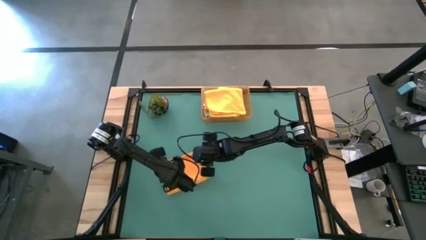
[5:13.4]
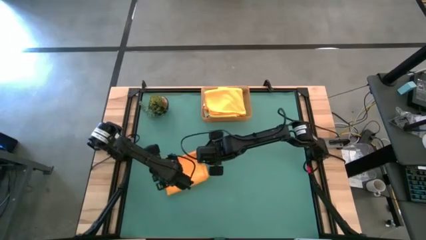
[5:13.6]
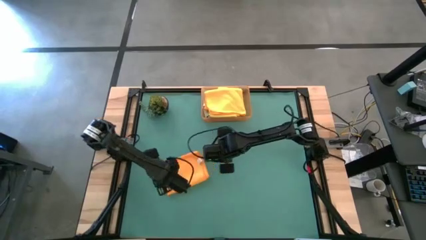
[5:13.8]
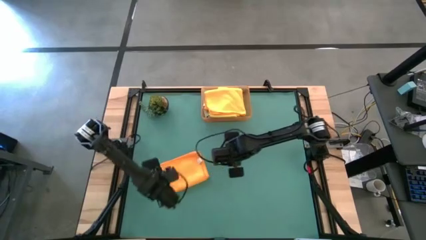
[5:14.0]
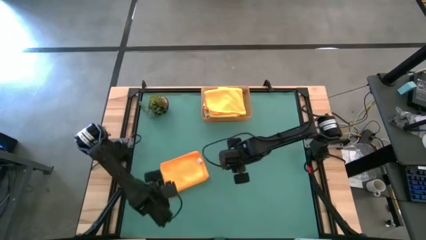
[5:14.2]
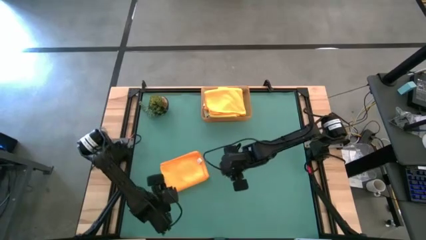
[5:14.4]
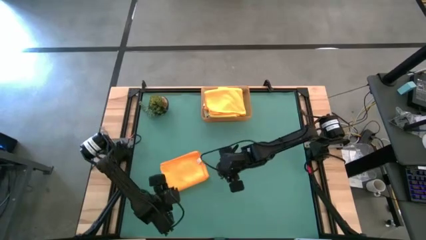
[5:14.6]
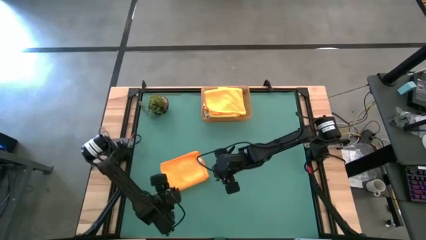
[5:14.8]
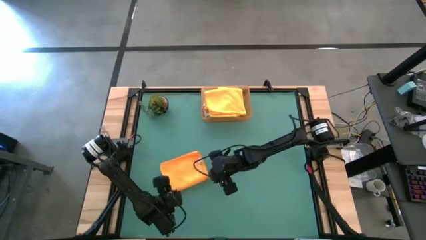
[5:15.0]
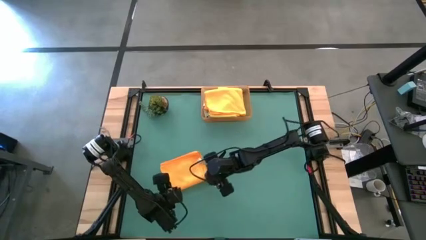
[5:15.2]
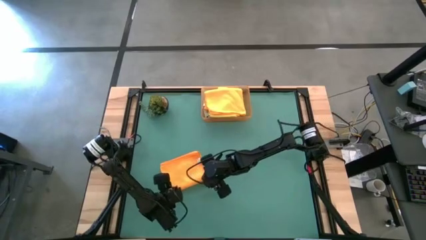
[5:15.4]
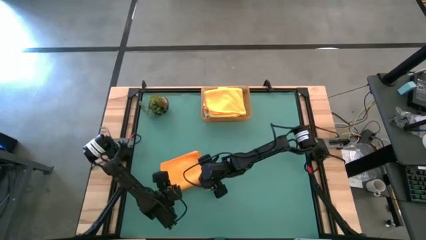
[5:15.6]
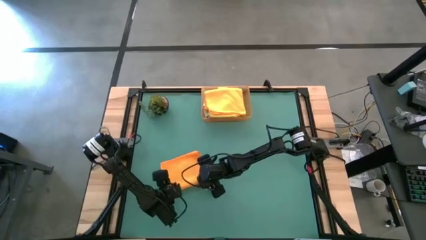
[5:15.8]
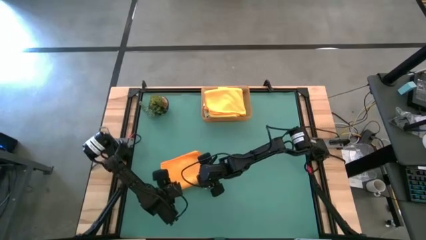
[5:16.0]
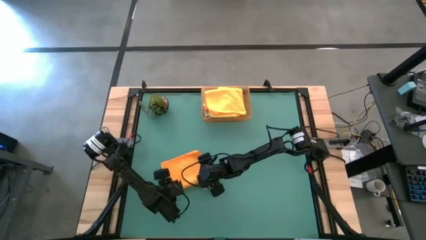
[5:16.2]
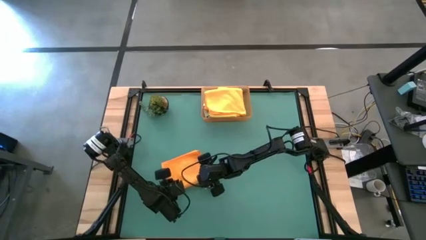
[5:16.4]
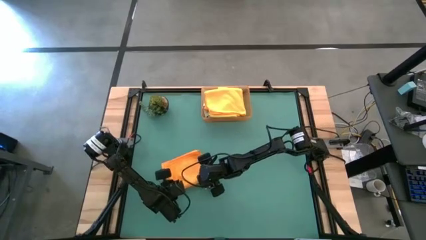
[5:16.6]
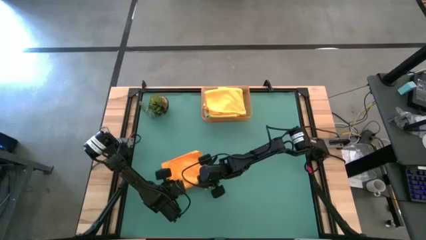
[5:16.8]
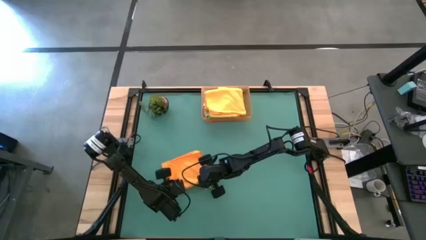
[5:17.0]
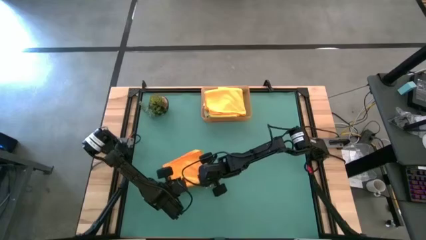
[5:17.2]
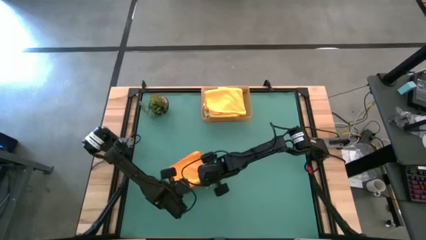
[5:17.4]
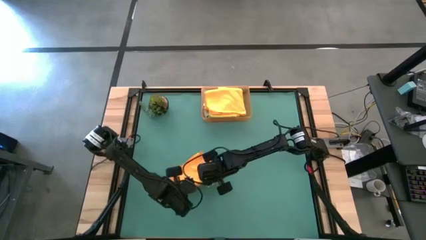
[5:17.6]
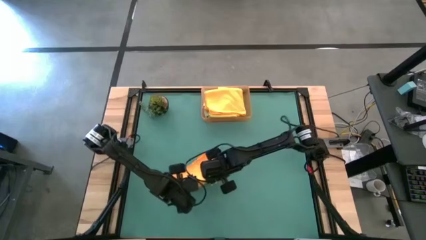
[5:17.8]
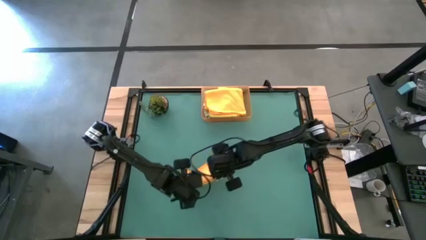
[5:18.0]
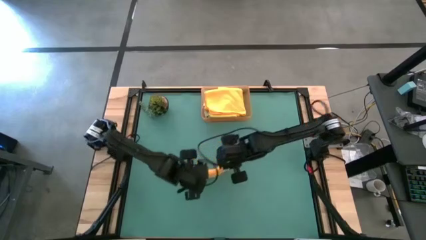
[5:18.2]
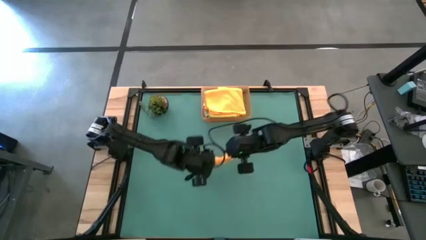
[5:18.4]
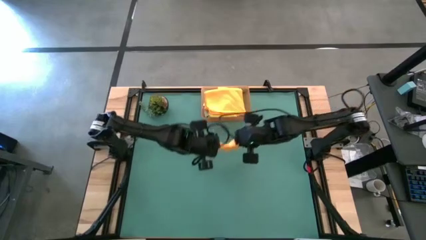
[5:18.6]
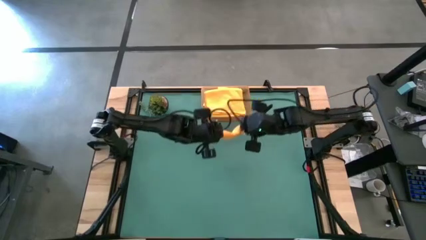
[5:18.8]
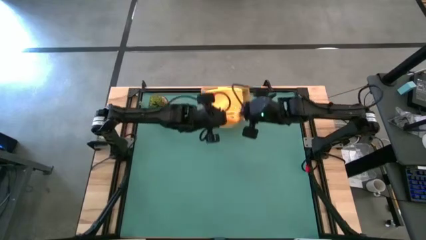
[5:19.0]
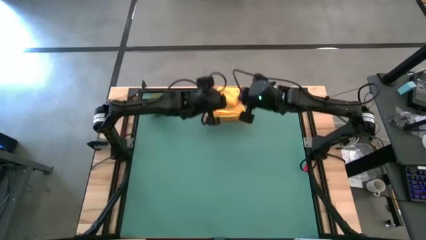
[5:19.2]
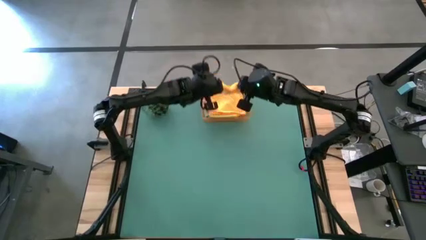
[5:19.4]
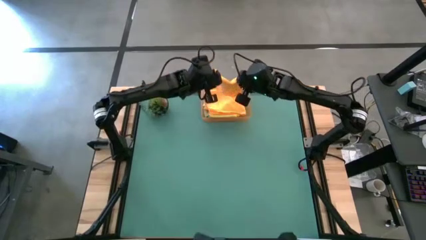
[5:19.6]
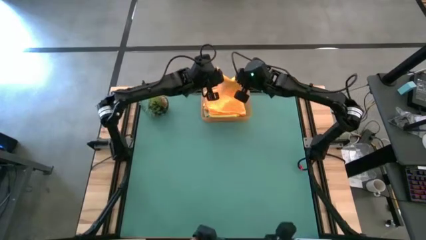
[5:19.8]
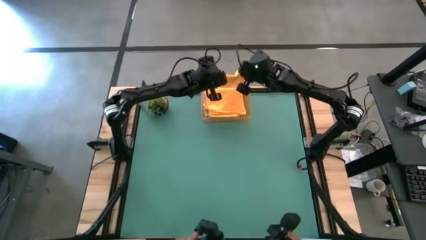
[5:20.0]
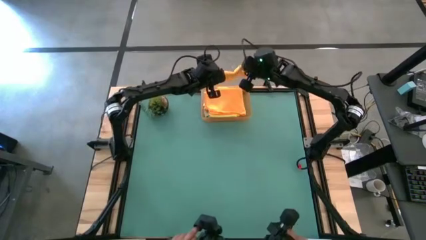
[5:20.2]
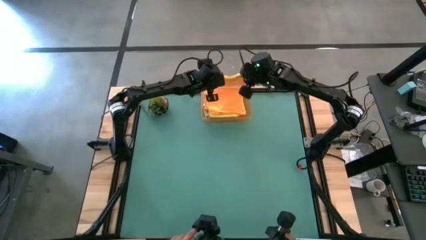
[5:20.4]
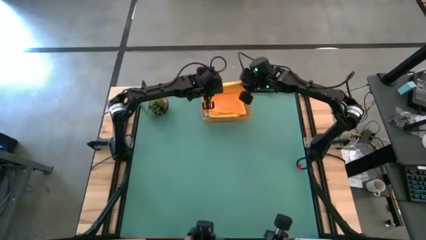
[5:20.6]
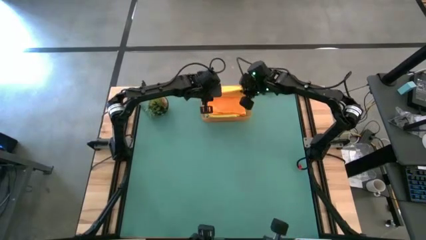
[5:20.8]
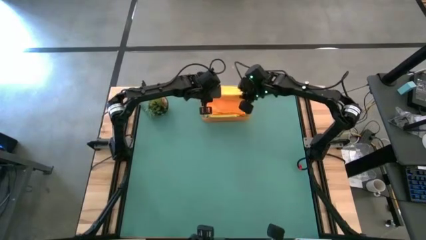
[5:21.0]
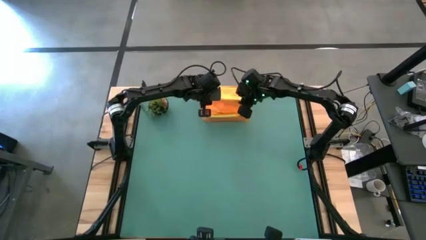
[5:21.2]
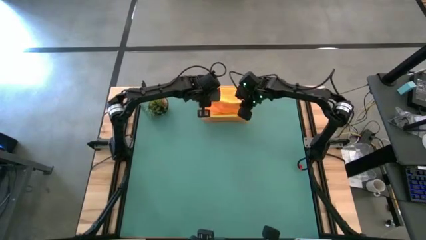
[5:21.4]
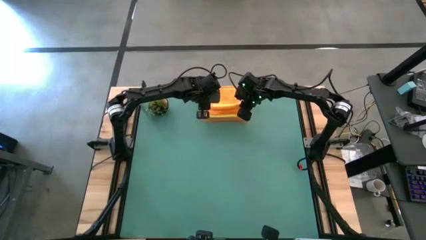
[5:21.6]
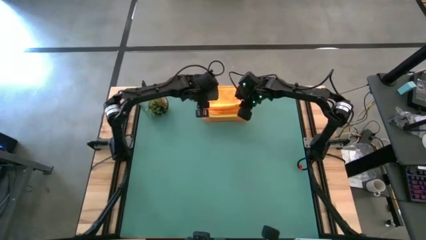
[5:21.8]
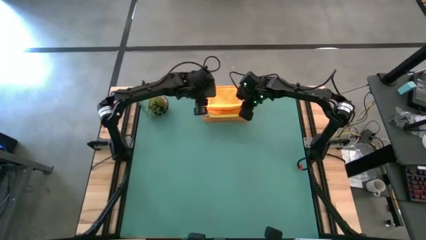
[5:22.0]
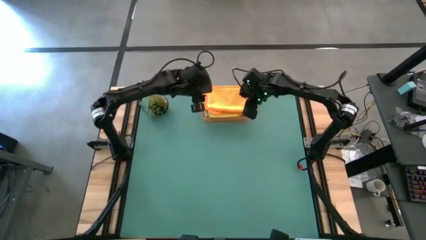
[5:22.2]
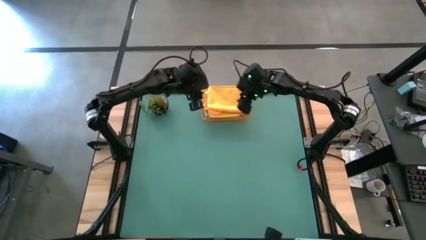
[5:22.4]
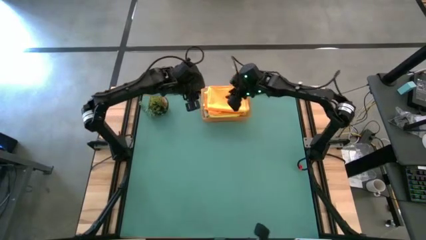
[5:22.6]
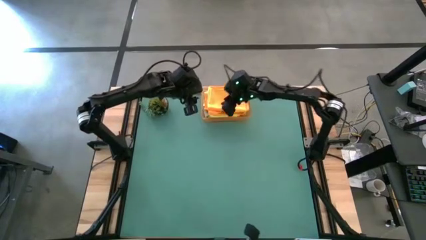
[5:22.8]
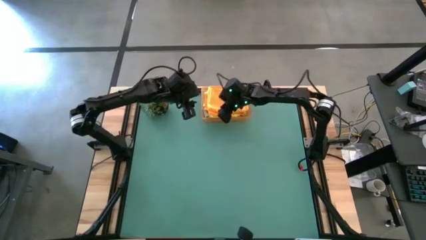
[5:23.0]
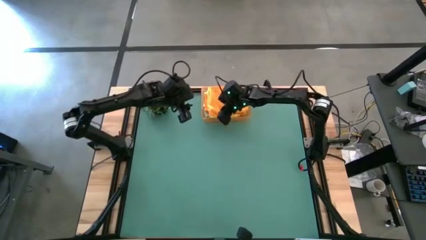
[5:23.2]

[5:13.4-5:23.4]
Task: Fold microfiber towels
Stack the orange microfiber towel on top of the orange microfiber towel in the orange bin

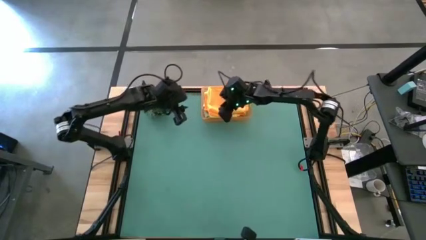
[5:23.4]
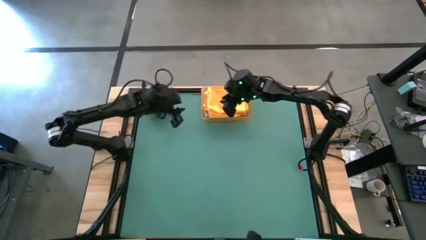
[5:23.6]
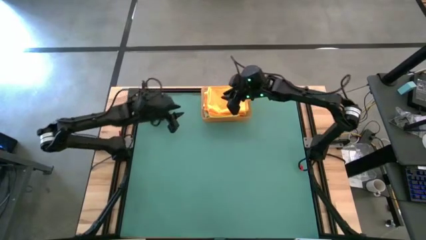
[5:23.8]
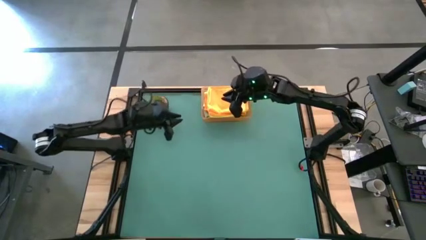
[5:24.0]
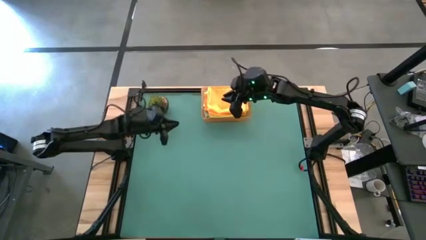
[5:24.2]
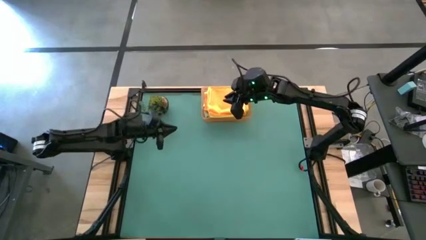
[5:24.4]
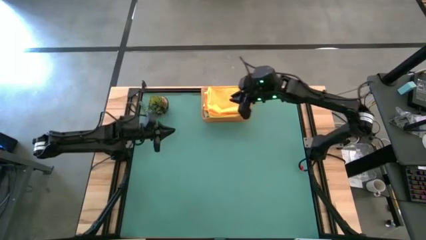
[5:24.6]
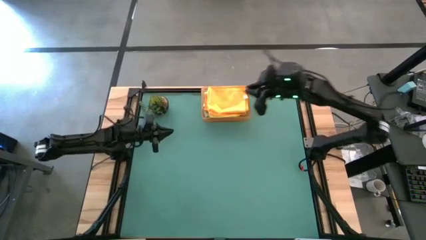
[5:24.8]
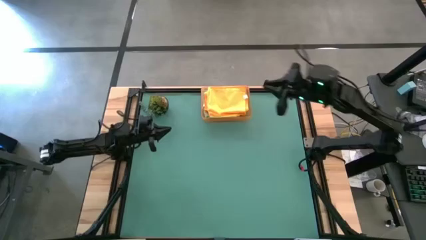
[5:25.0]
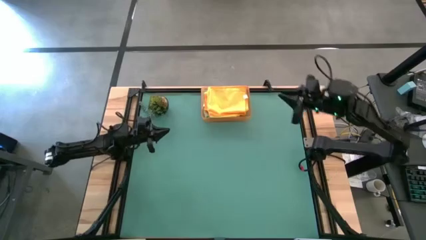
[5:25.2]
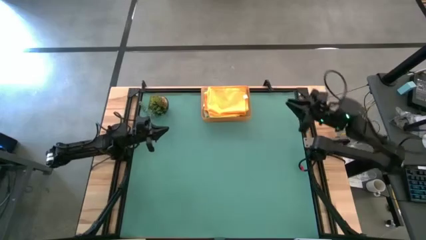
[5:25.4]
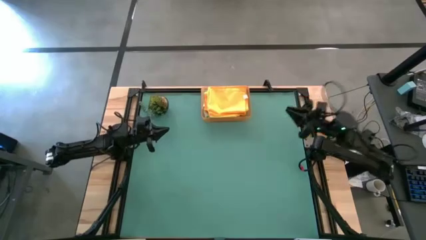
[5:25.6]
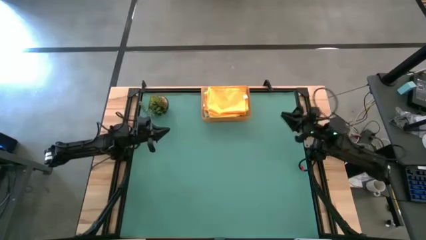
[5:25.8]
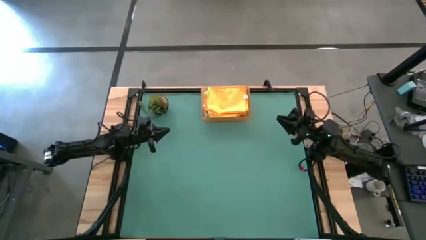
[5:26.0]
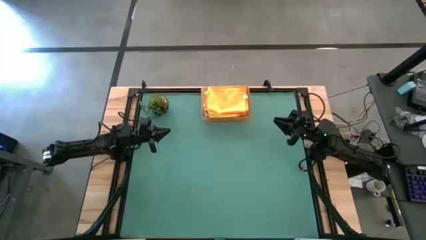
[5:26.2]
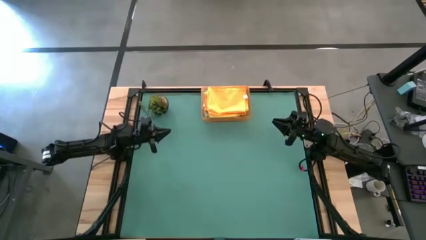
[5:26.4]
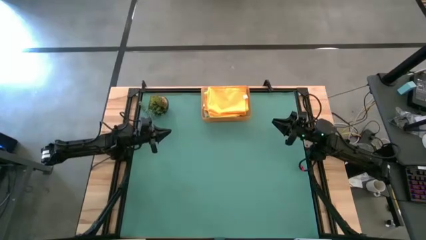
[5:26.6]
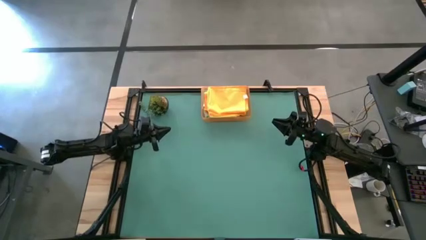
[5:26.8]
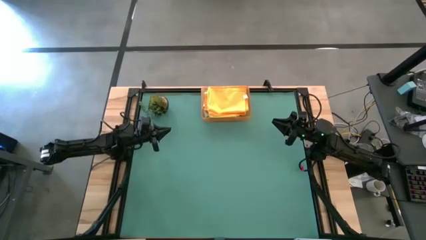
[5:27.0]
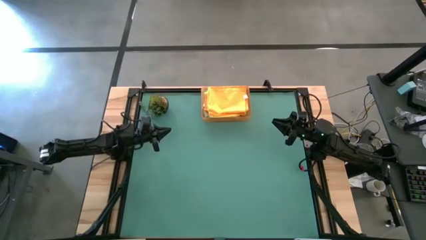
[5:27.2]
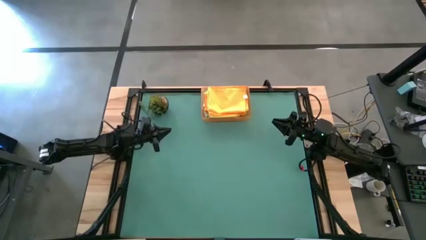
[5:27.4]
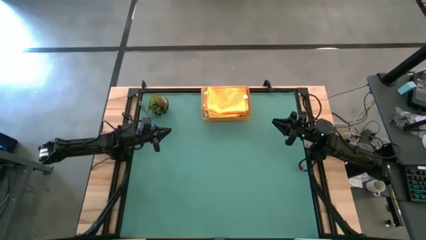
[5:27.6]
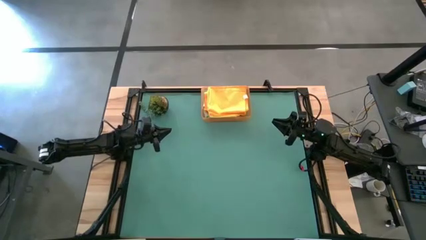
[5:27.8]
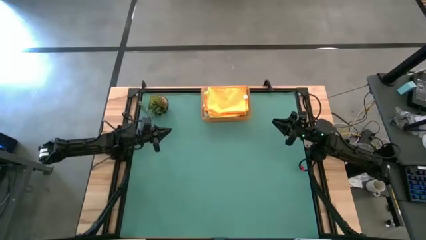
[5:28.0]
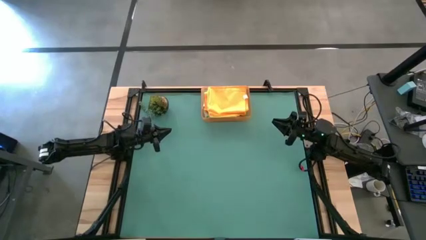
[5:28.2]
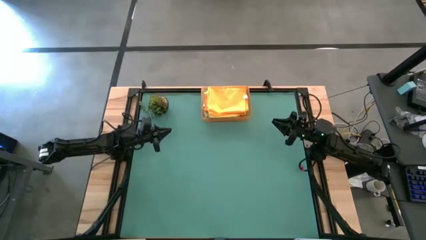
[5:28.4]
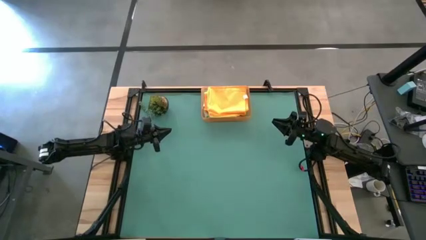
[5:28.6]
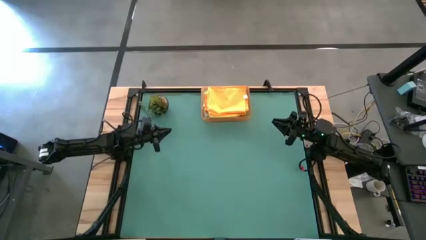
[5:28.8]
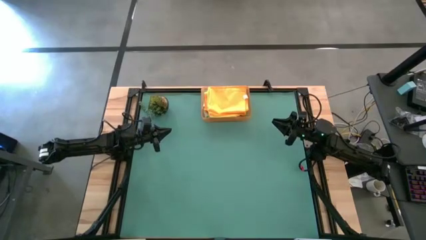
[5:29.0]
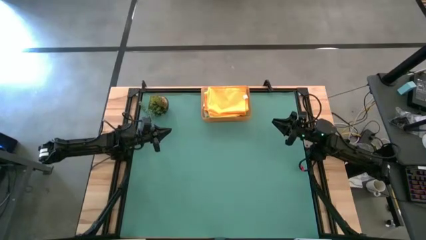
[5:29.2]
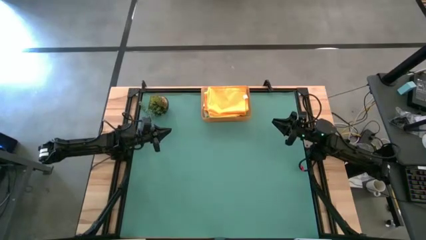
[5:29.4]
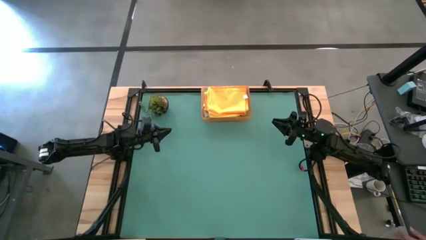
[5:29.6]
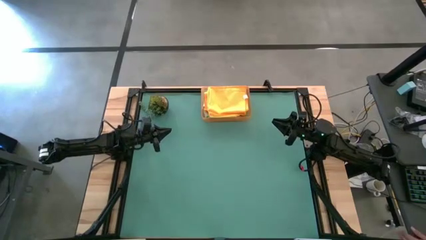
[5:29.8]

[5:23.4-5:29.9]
Return to Home Position
